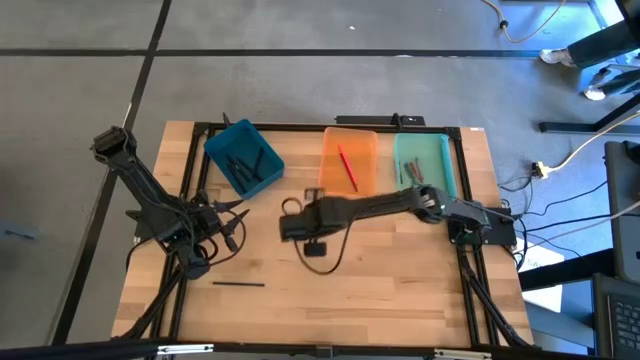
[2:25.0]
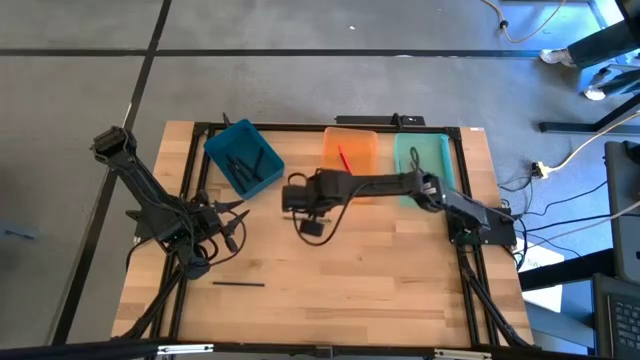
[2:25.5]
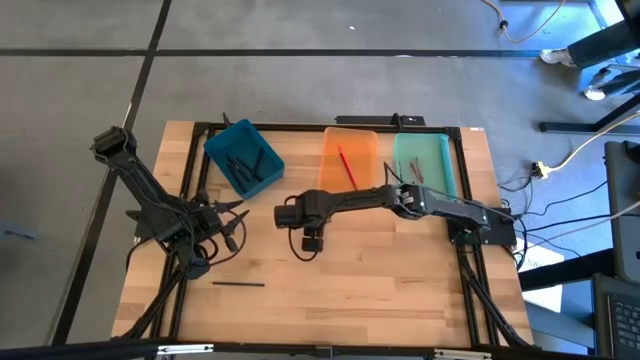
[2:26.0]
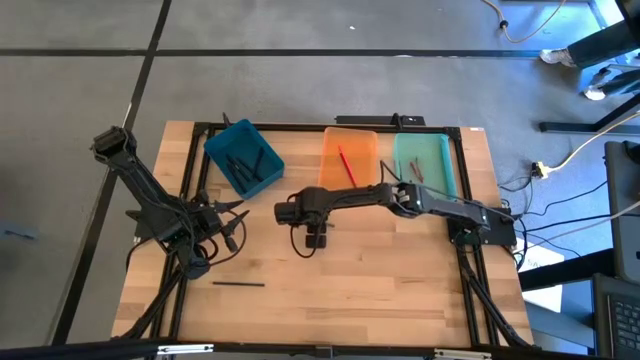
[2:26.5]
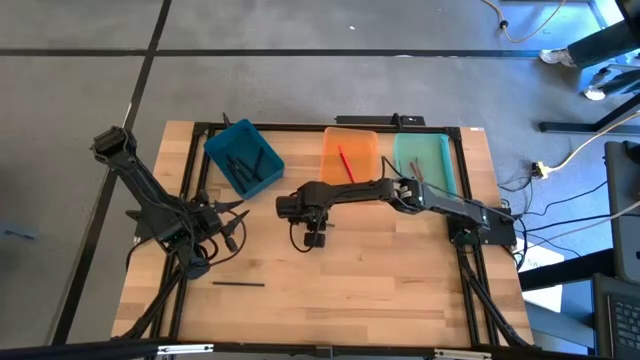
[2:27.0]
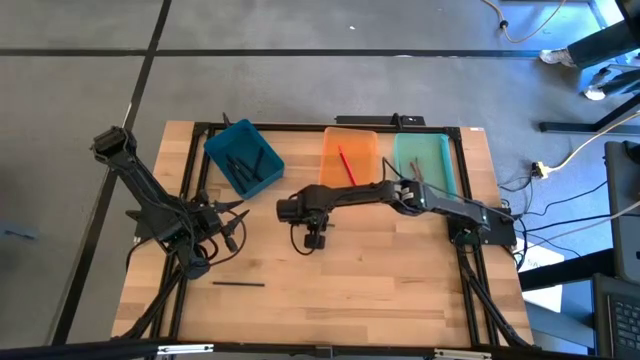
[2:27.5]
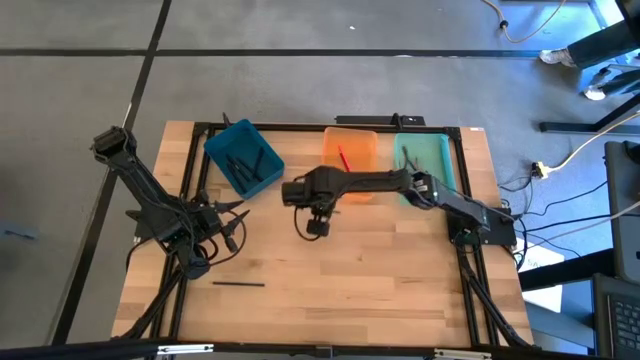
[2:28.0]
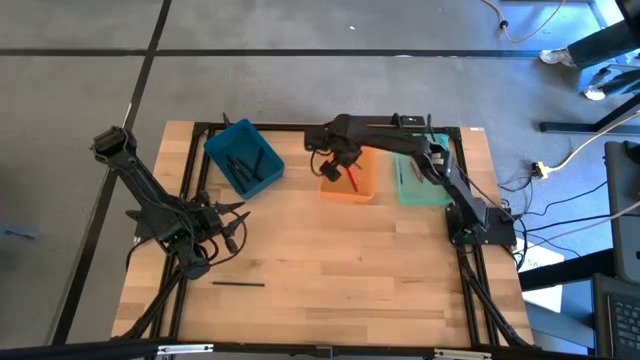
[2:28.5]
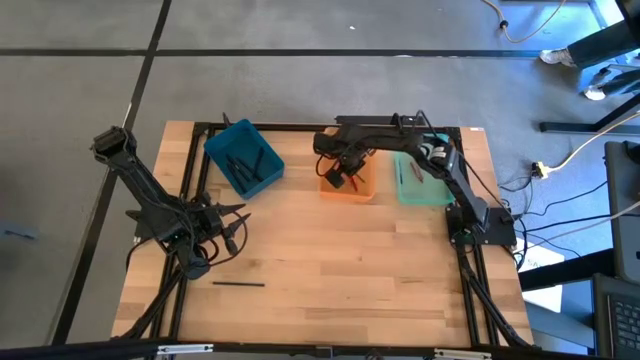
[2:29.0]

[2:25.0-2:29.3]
Task: Sort crayons/erasers/pens/pencils in bins
Put the green pencil into the orange bin

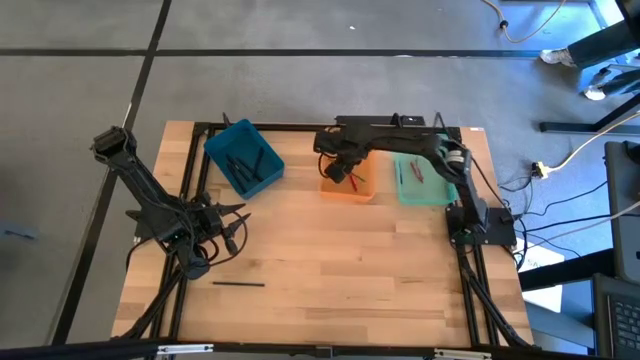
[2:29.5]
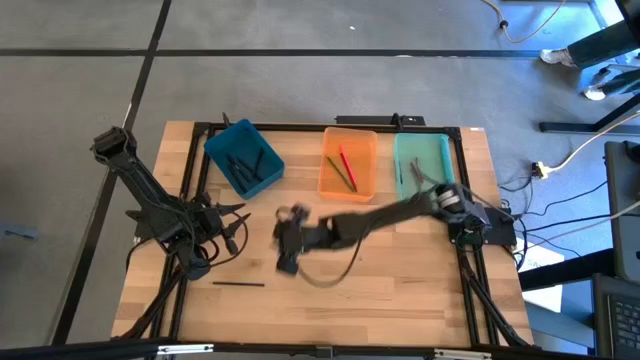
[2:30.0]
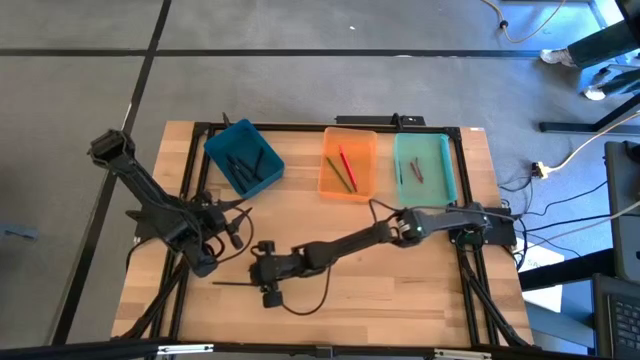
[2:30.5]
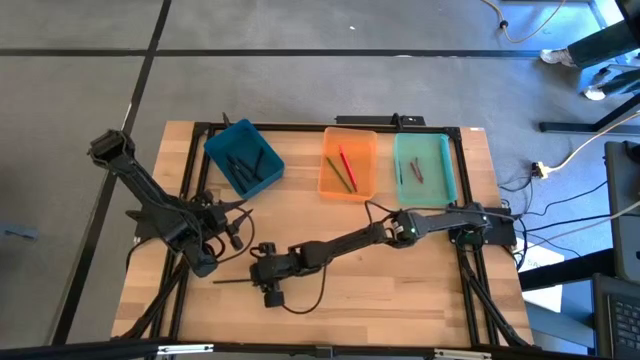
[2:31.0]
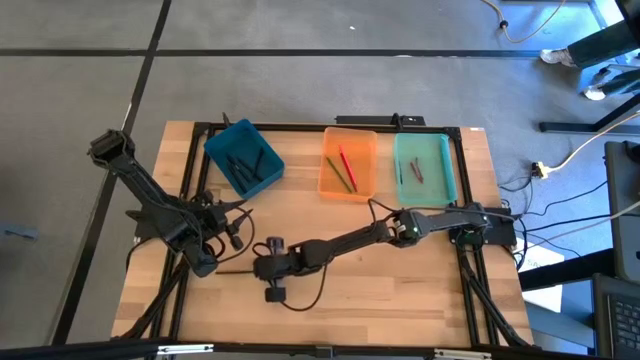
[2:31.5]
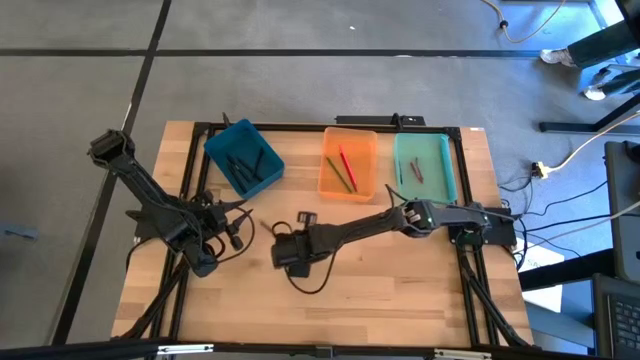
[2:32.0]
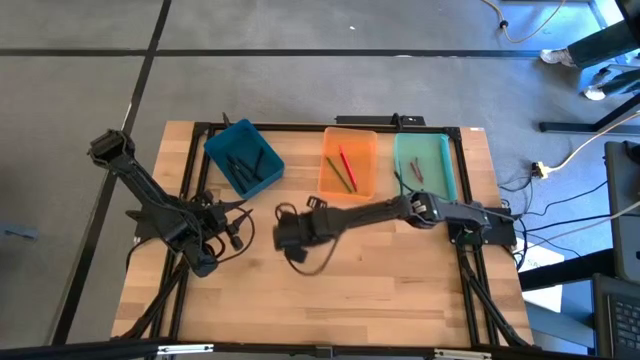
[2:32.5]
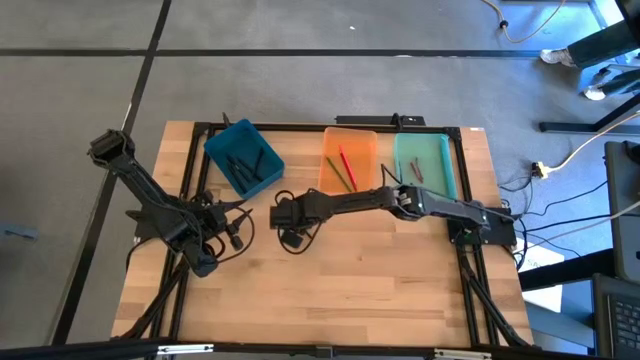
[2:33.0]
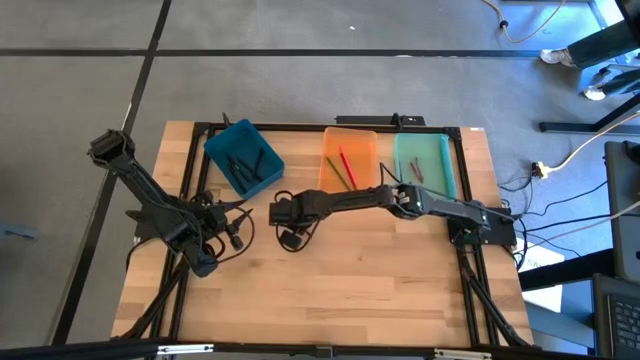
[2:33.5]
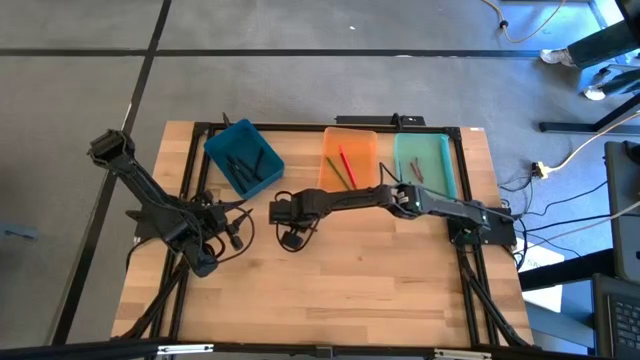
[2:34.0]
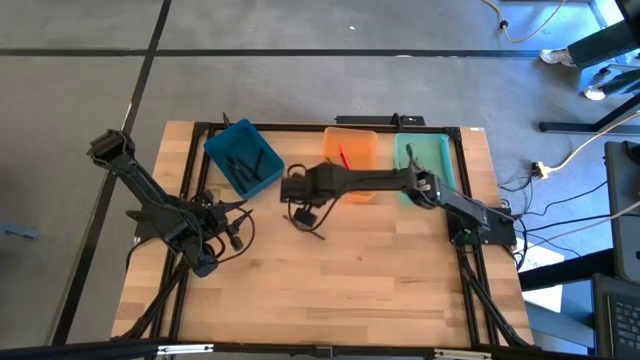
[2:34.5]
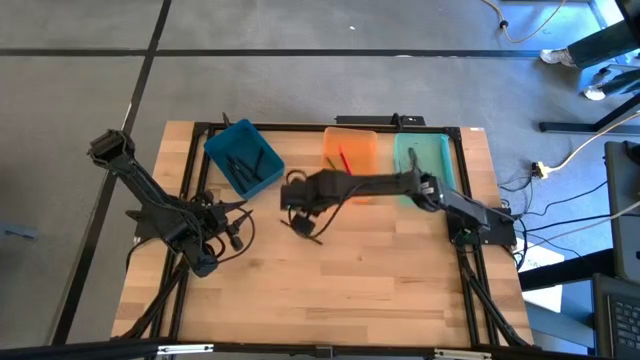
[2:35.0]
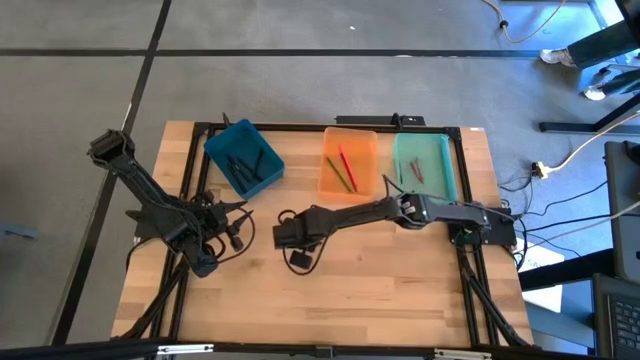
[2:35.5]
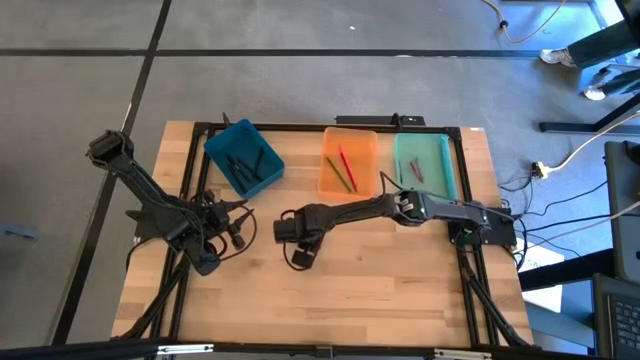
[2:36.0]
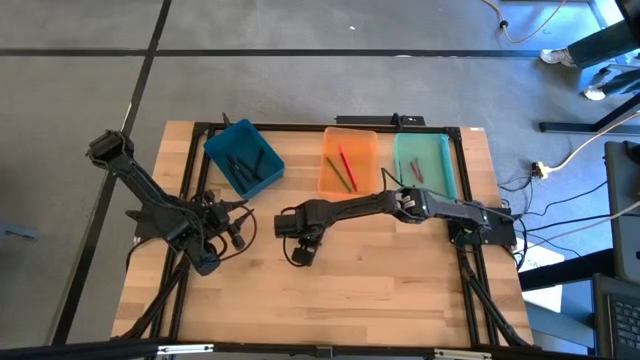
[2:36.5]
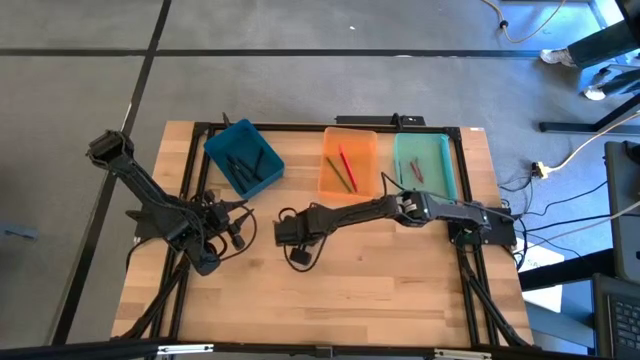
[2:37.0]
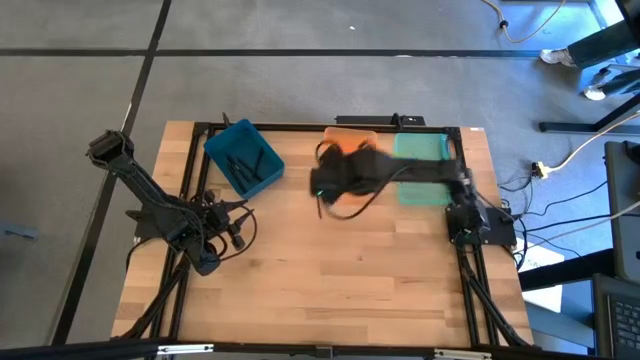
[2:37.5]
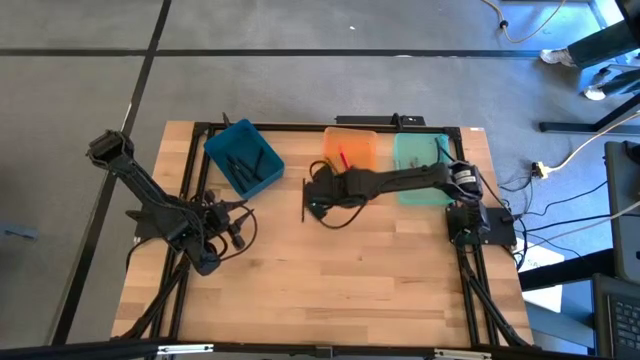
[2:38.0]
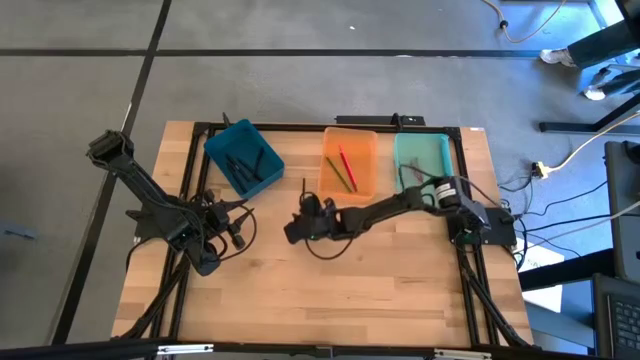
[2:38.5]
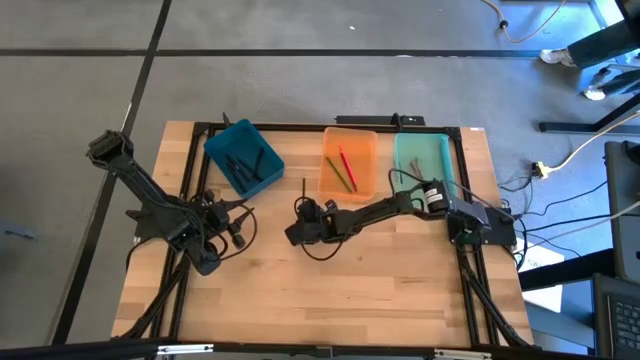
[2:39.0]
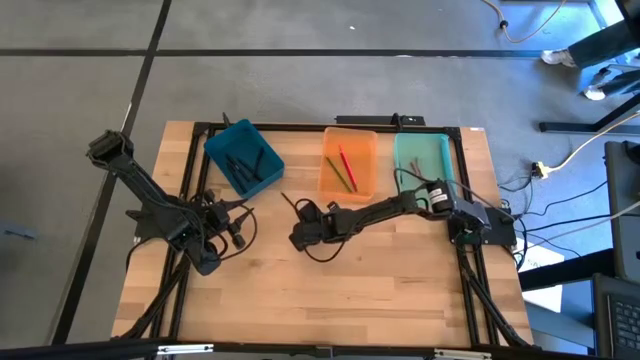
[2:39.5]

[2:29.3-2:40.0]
Put the dark blue pencil into the orange bin

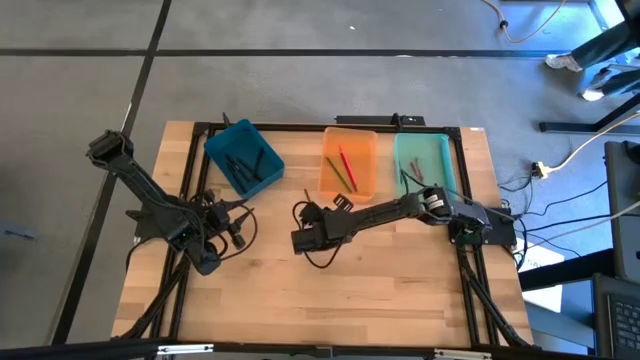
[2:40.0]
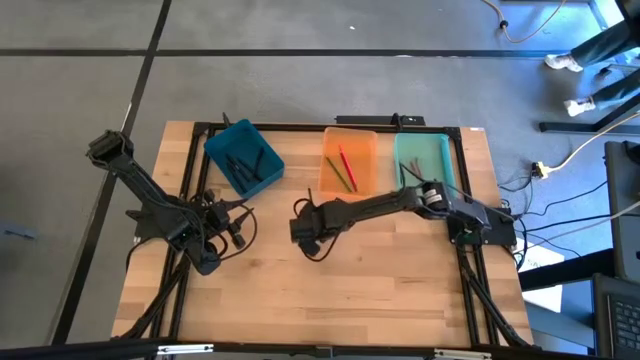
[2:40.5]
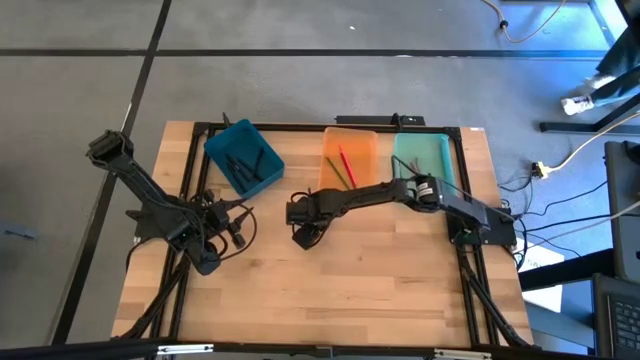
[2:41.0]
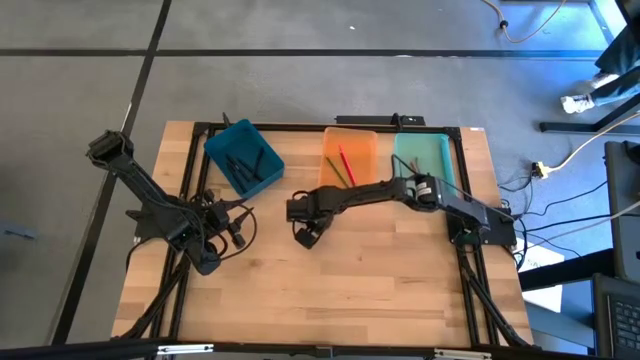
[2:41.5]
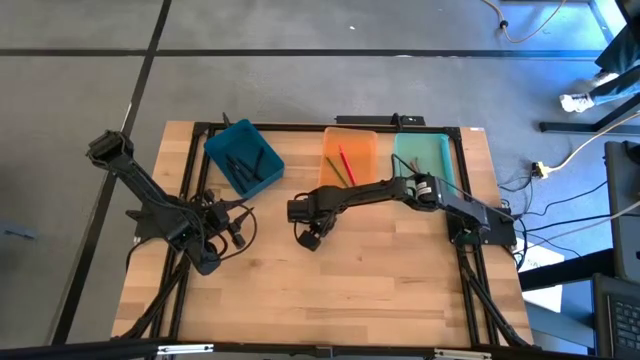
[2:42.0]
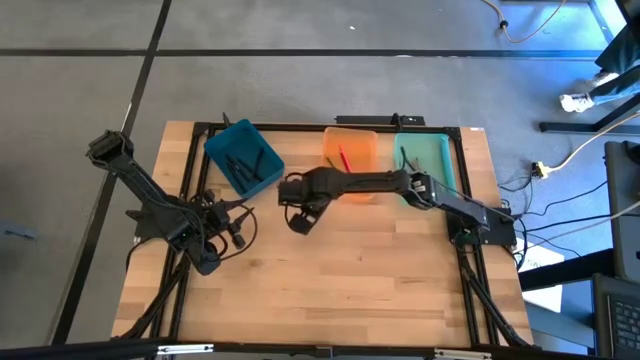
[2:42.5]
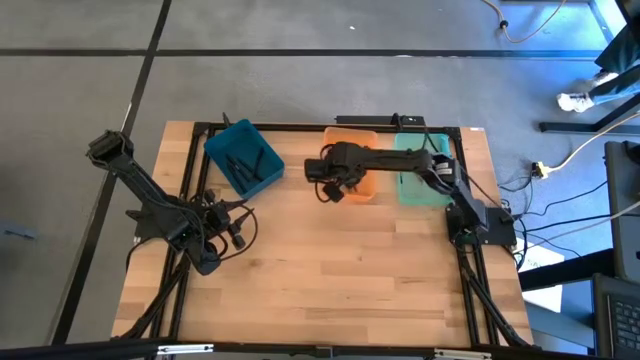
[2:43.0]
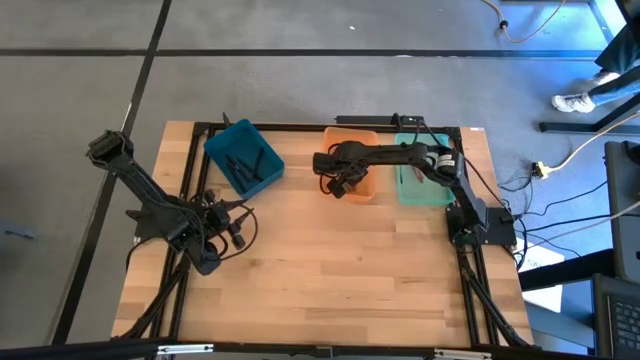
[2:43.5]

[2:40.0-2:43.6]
Put the dark blue pencil into the orange bin

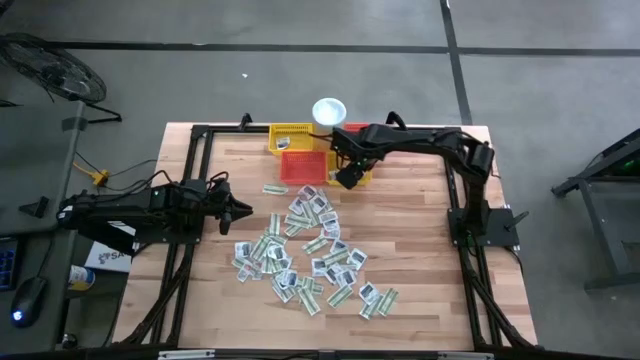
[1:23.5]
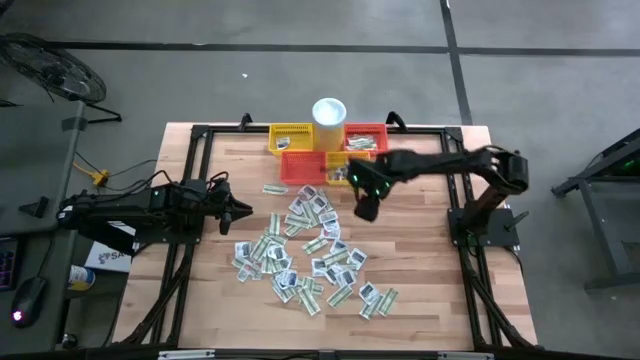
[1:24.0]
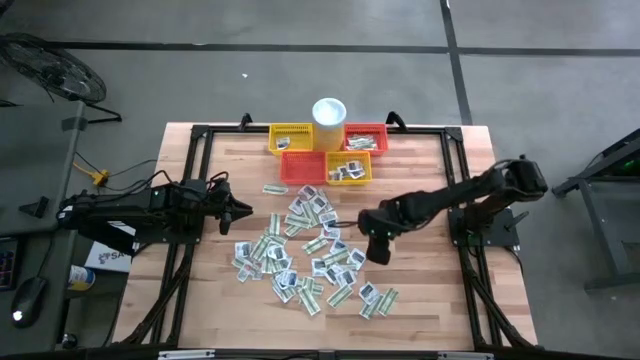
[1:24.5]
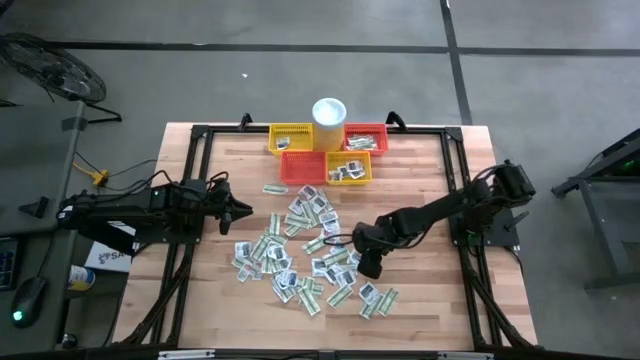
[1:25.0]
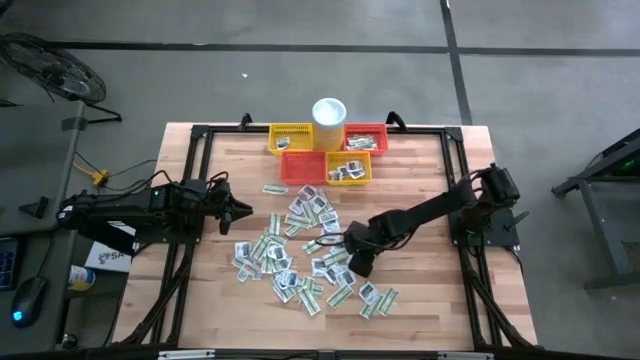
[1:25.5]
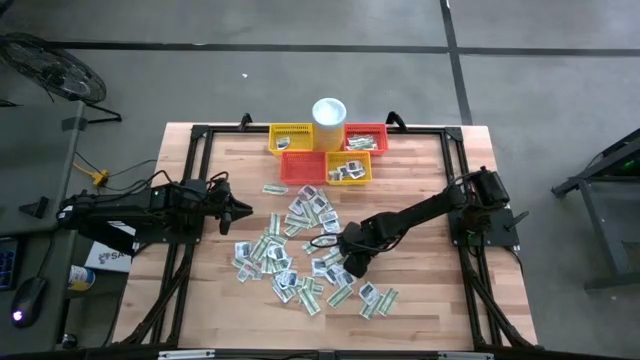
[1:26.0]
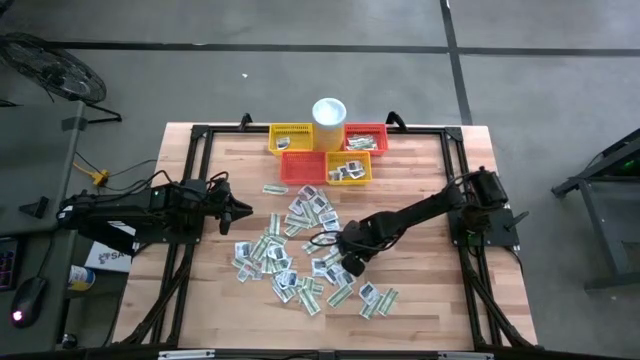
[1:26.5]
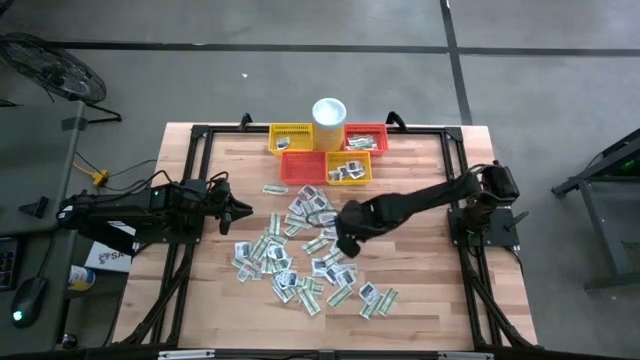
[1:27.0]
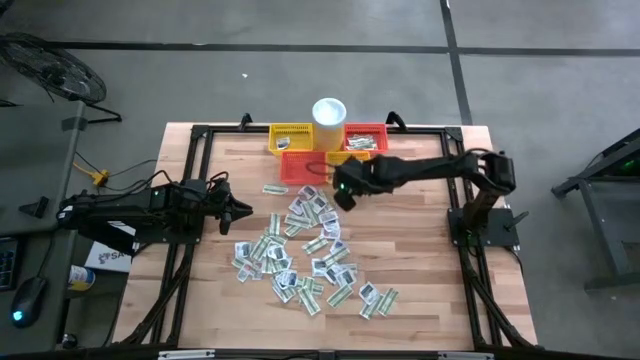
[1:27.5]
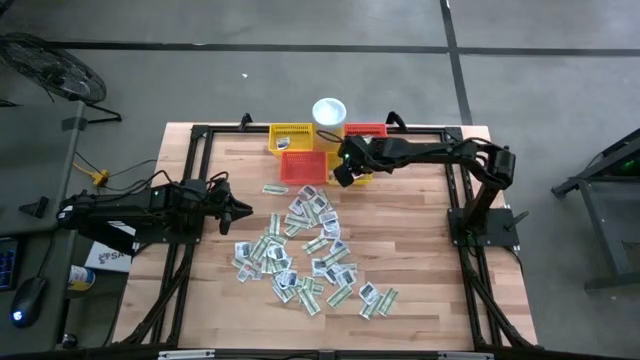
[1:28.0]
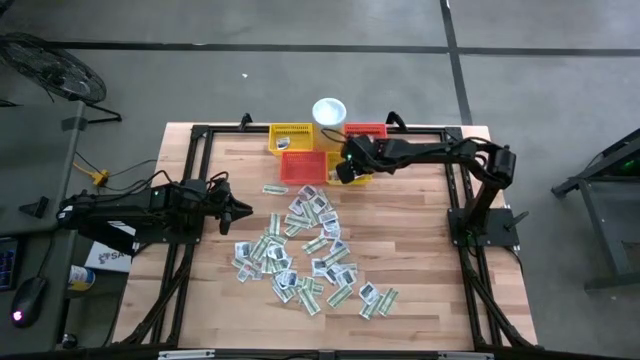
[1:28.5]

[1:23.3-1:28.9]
Task: Pick & Place First Aid Supplies
Put the black towelette pack into the bottom yellow basket
